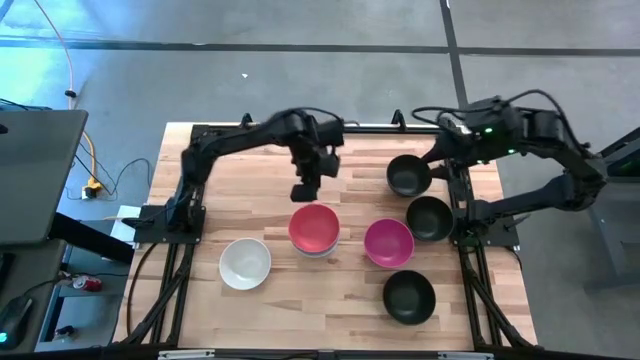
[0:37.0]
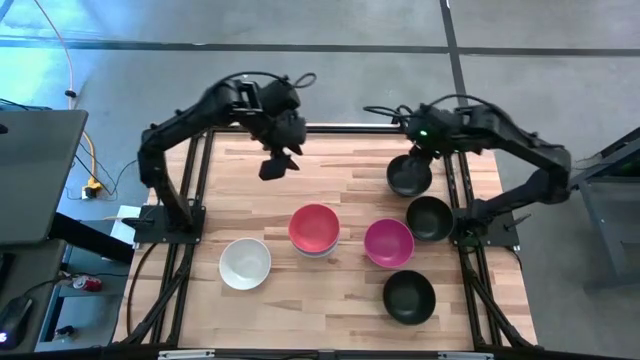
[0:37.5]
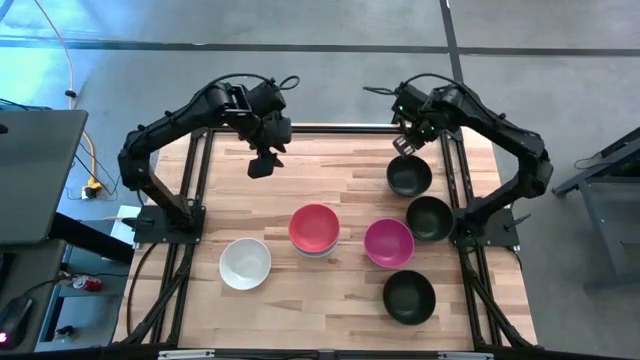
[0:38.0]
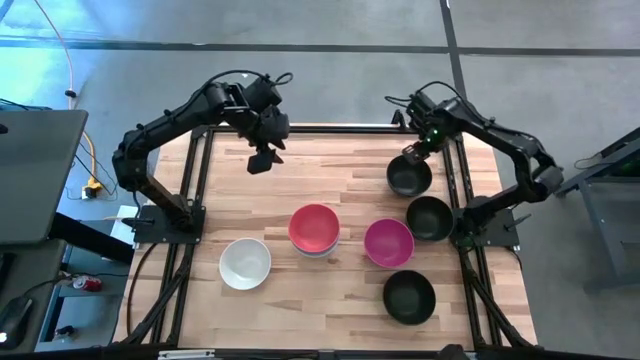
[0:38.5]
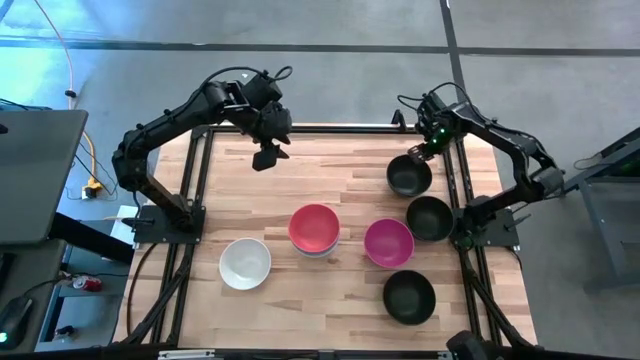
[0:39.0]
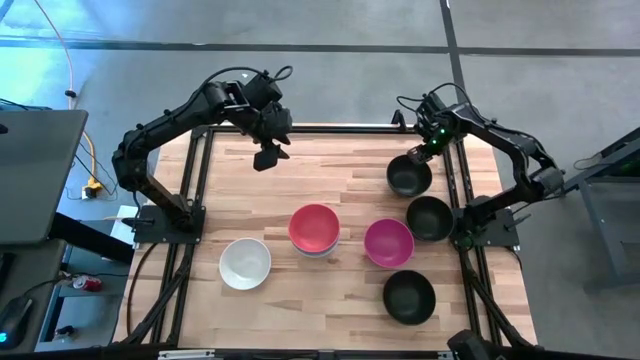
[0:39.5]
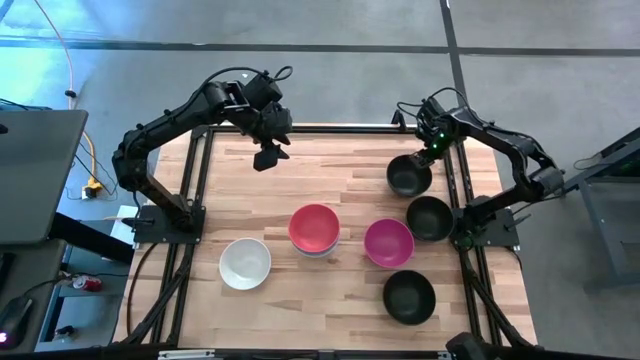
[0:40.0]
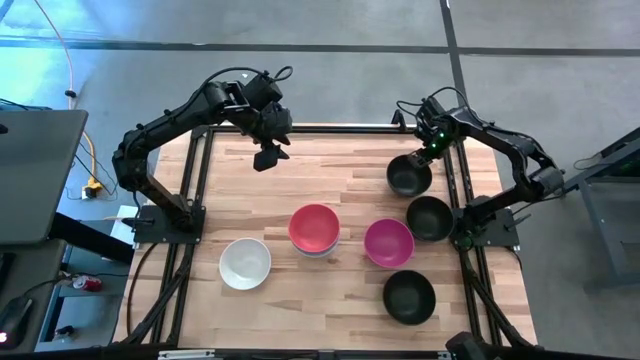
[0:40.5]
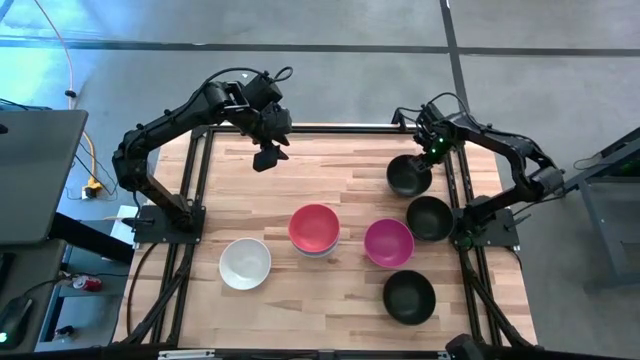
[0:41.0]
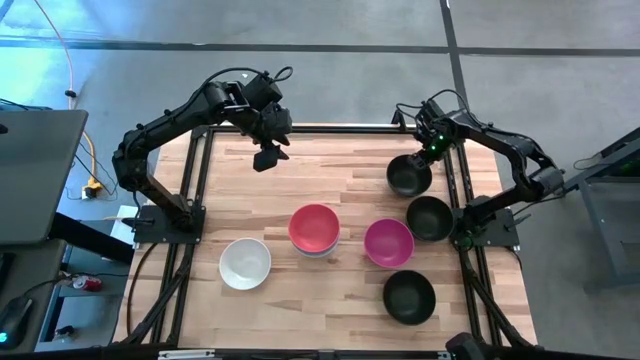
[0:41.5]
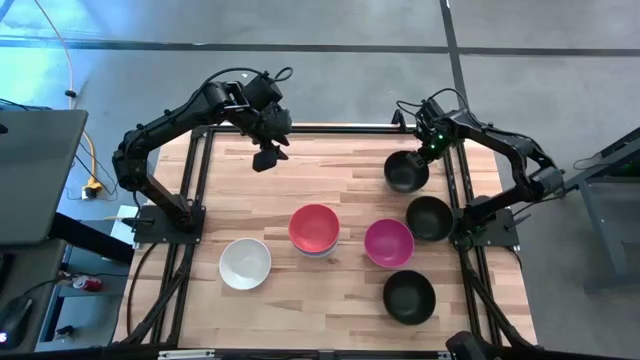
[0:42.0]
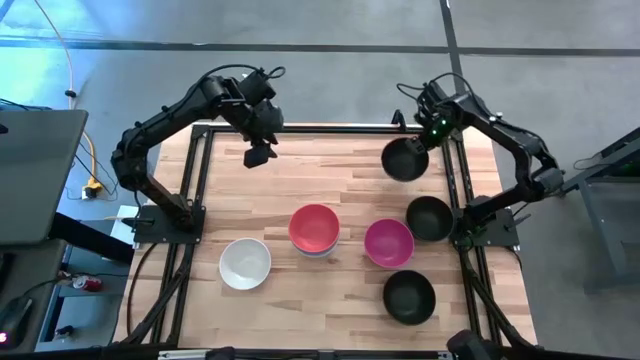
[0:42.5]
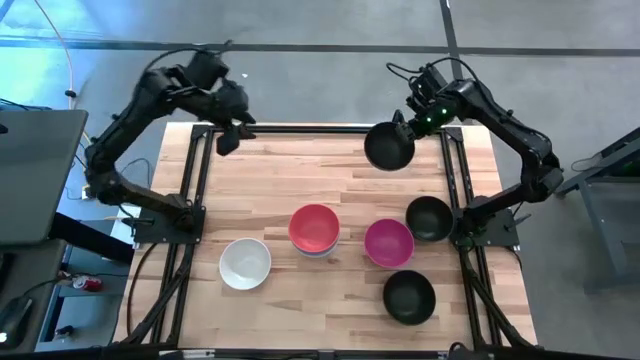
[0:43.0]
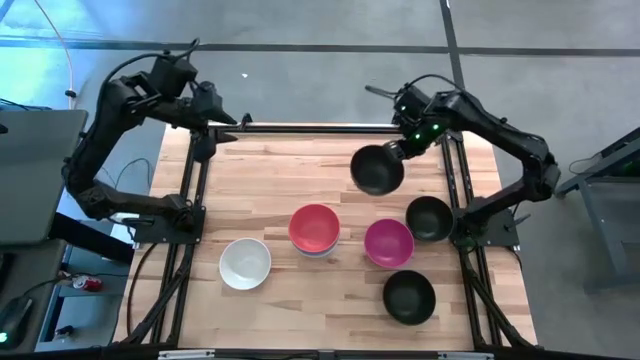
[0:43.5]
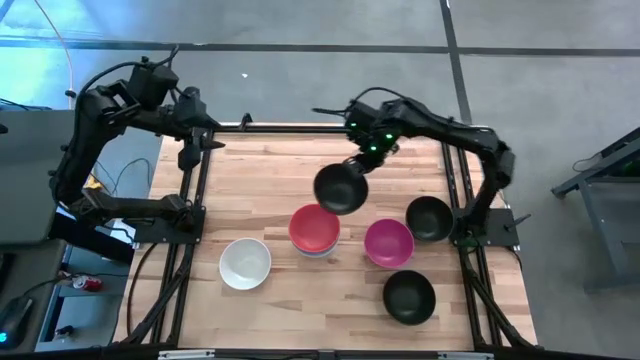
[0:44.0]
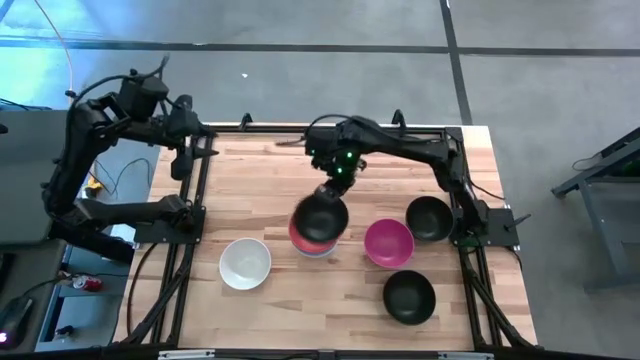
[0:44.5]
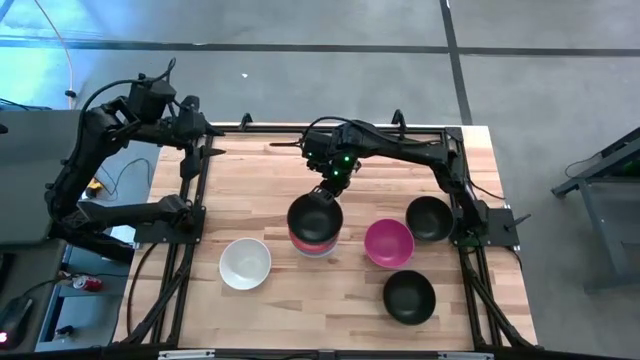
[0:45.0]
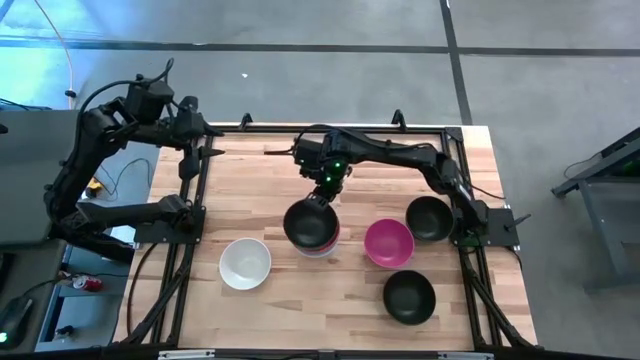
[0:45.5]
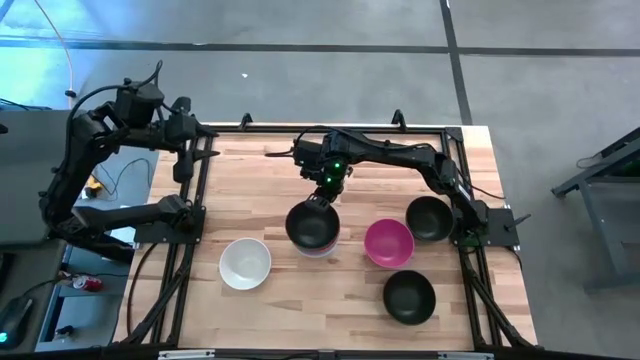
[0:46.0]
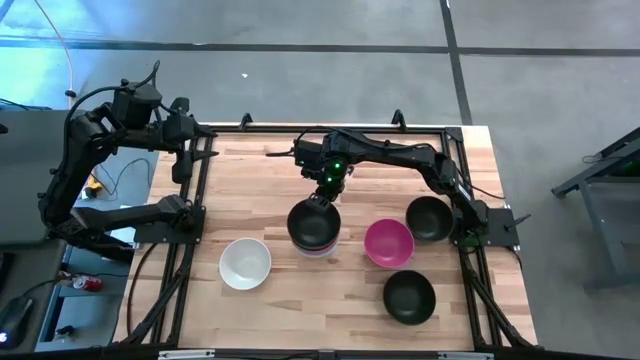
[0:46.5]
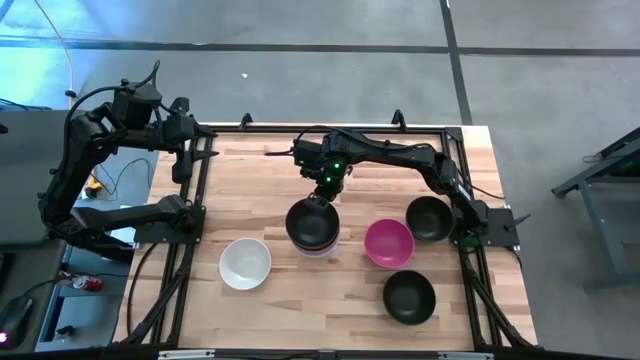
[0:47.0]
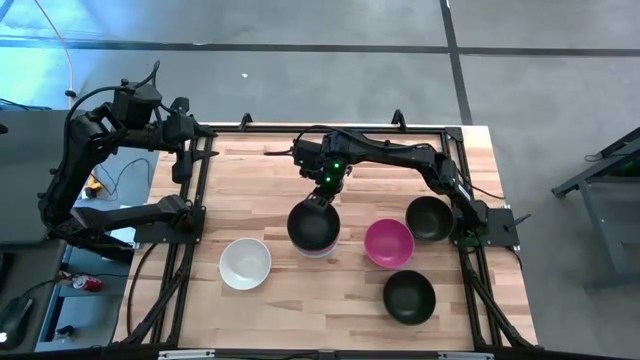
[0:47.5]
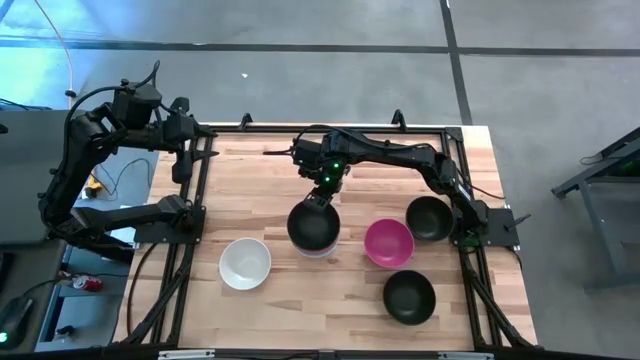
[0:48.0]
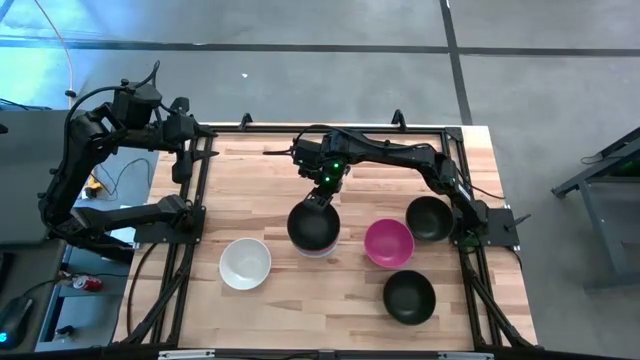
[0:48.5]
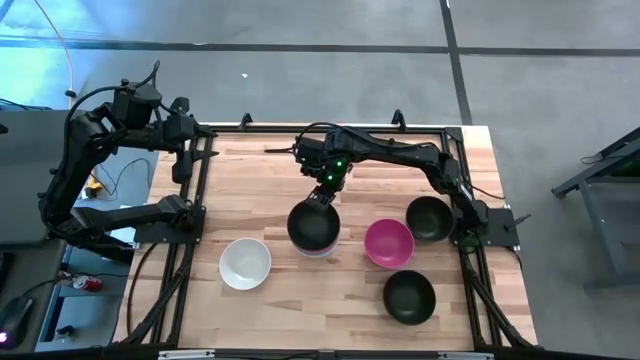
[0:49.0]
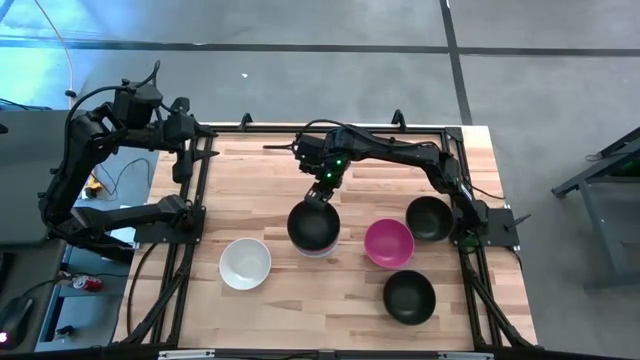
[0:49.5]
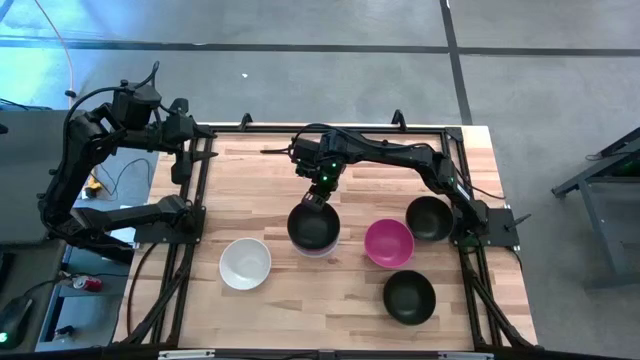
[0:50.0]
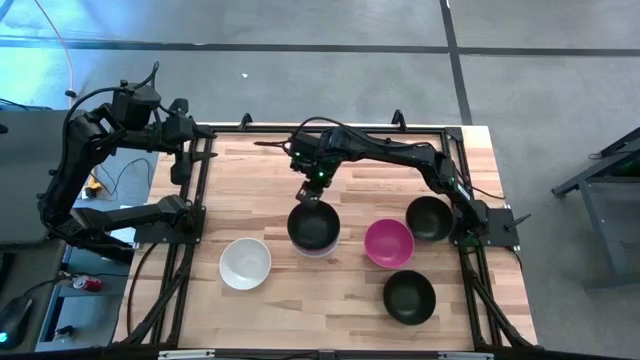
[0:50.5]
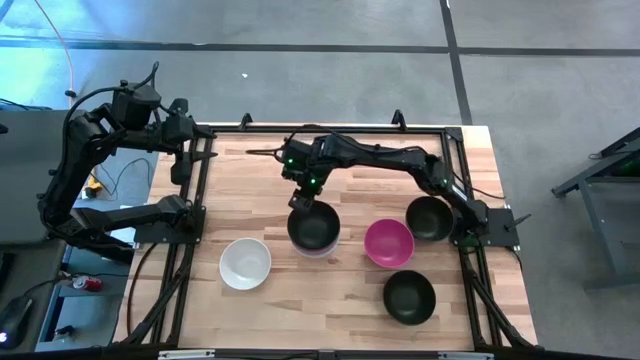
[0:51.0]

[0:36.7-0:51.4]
Task: Nest bowls inside each other
Stack the top black bowl on top of the red bowl

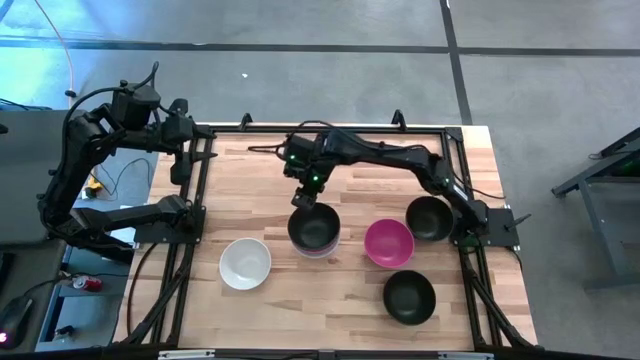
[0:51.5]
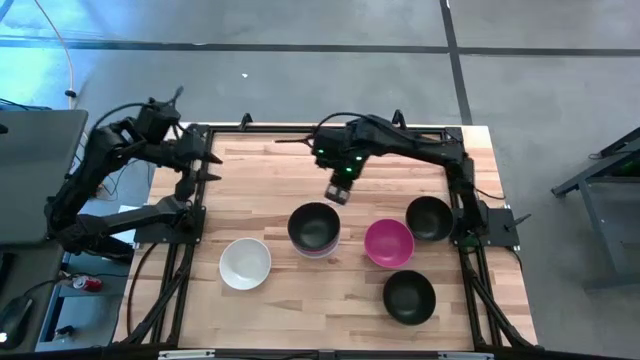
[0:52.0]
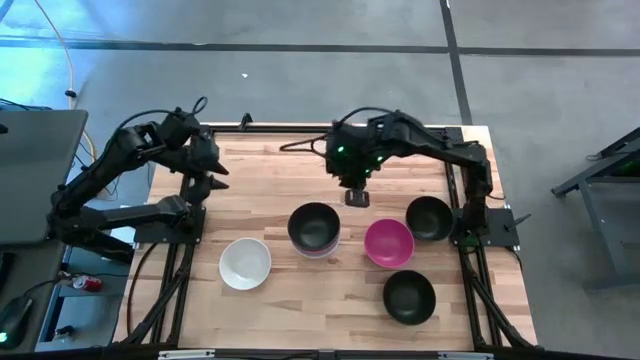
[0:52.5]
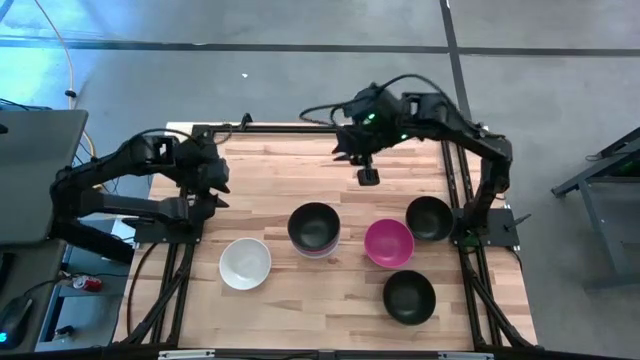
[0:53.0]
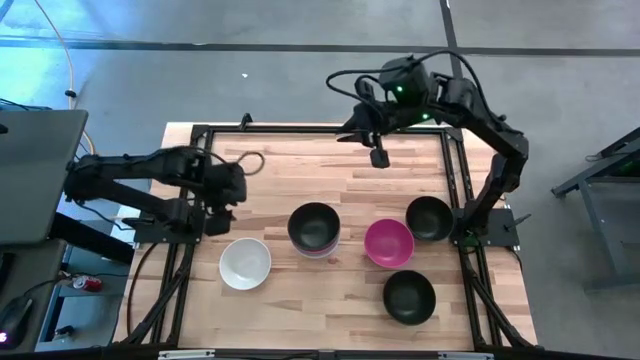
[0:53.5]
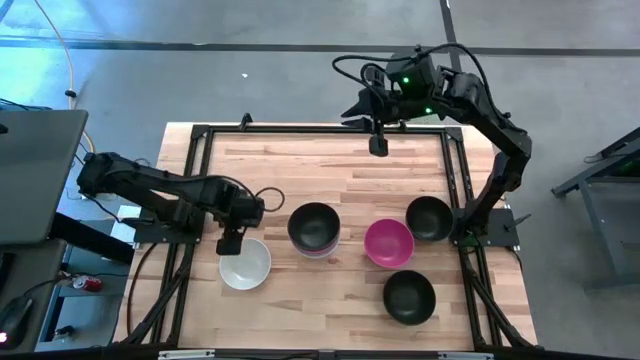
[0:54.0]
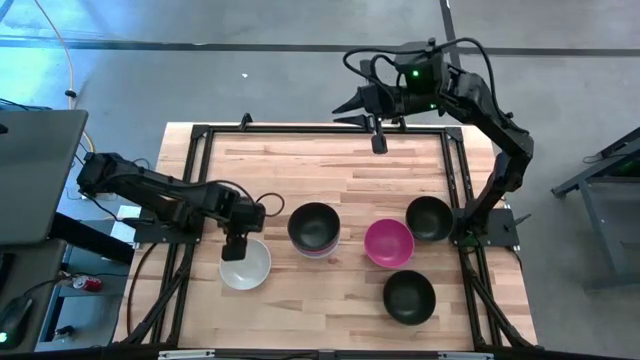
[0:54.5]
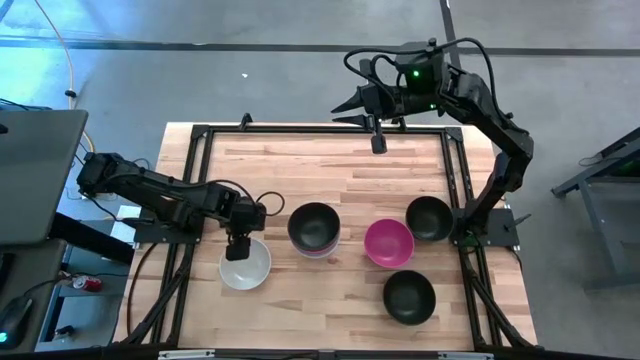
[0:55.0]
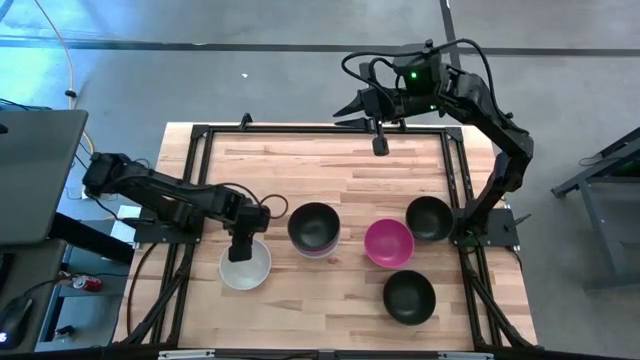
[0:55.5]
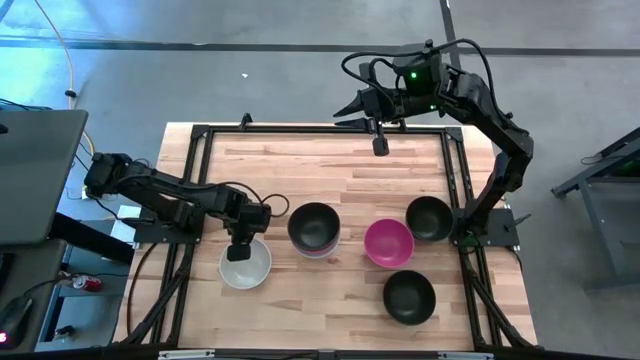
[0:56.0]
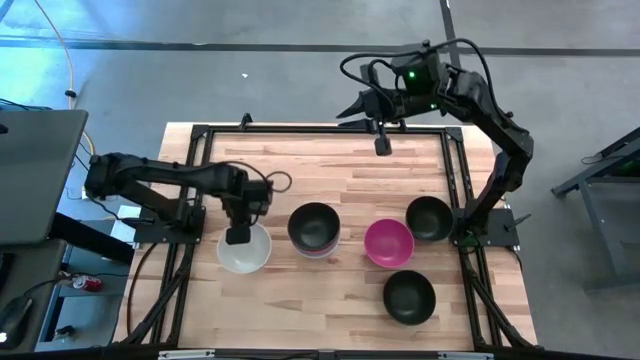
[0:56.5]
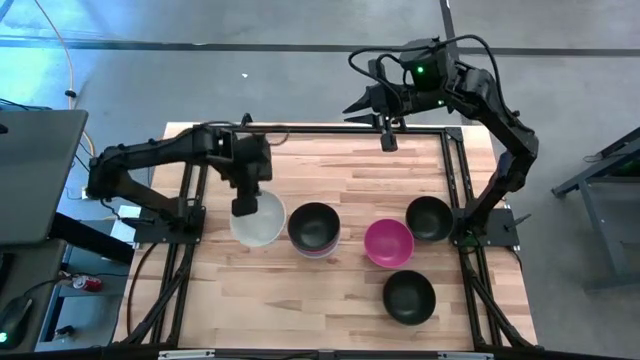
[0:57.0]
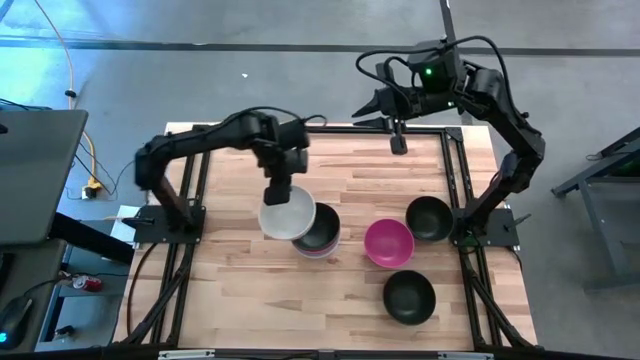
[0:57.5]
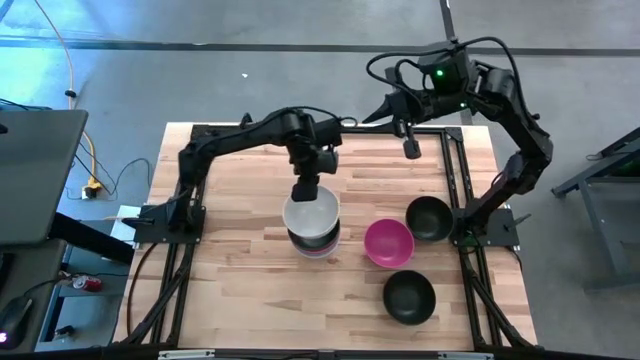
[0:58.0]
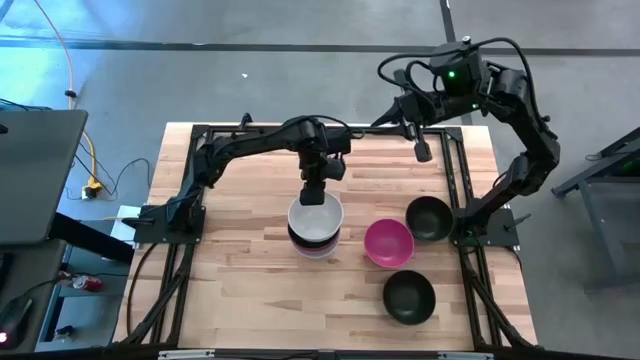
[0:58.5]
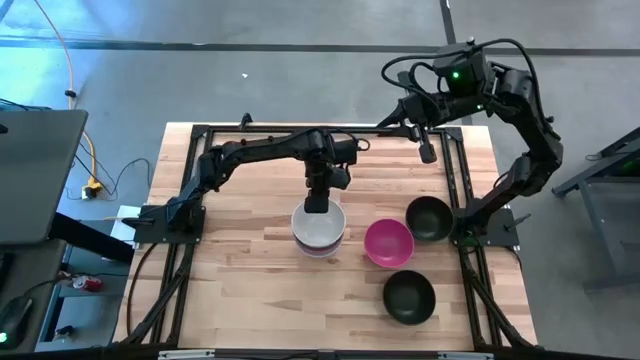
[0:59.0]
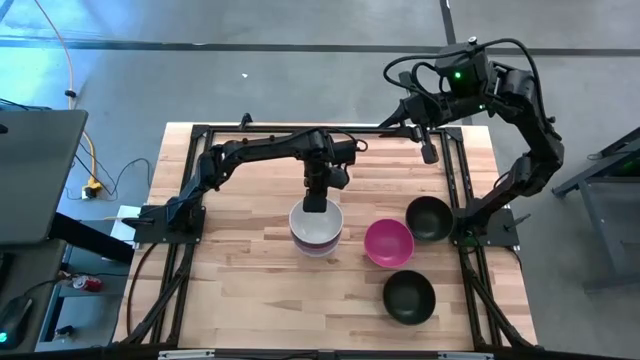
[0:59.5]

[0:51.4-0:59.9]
Stack the white bowl on top of the top left black bowl
